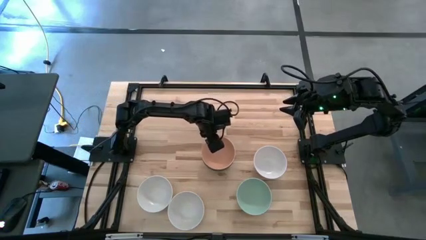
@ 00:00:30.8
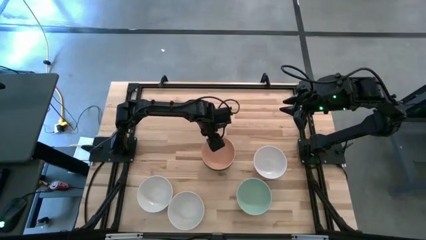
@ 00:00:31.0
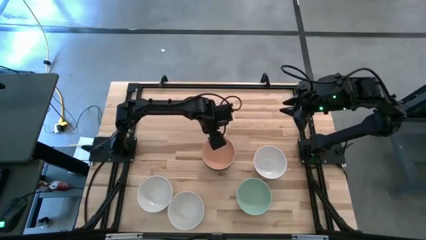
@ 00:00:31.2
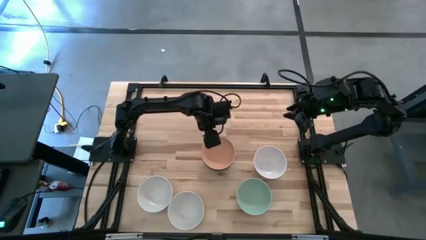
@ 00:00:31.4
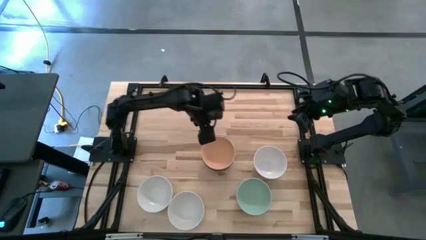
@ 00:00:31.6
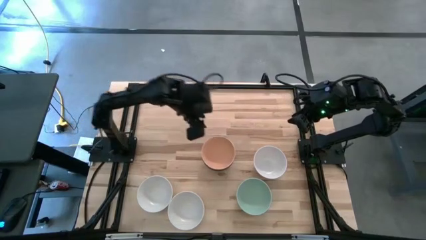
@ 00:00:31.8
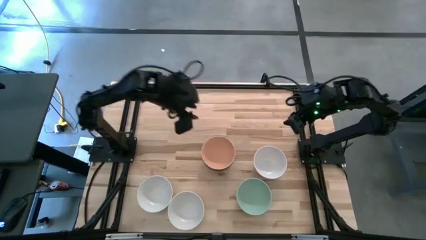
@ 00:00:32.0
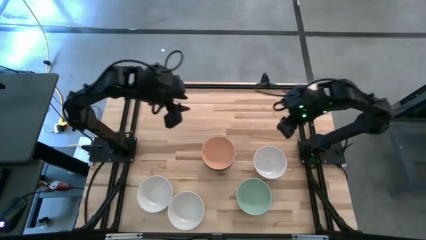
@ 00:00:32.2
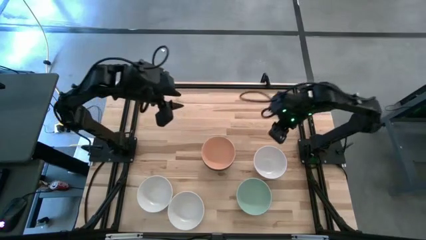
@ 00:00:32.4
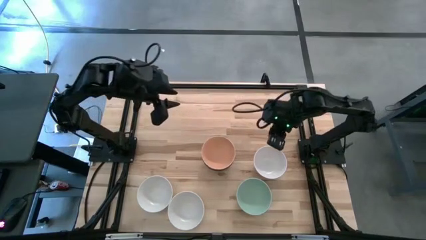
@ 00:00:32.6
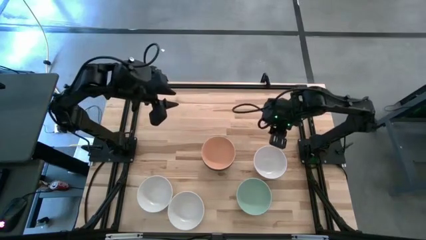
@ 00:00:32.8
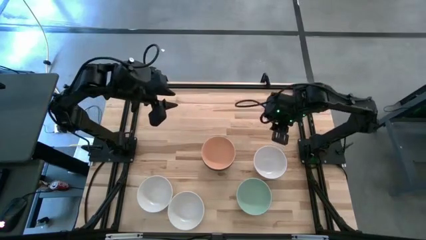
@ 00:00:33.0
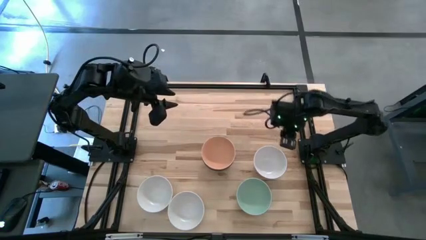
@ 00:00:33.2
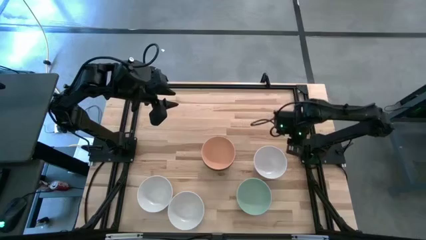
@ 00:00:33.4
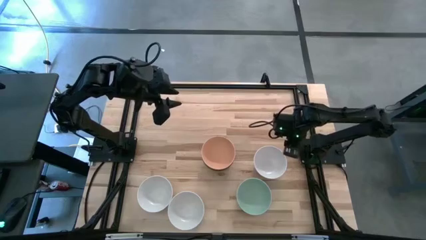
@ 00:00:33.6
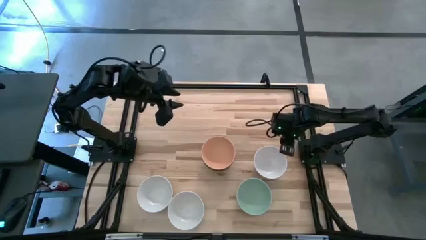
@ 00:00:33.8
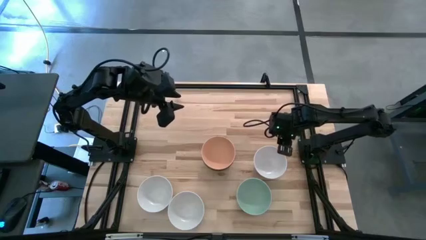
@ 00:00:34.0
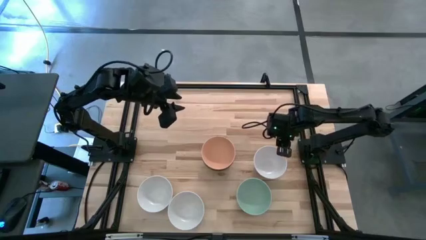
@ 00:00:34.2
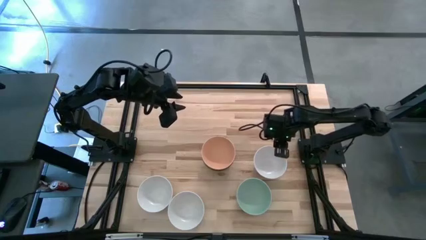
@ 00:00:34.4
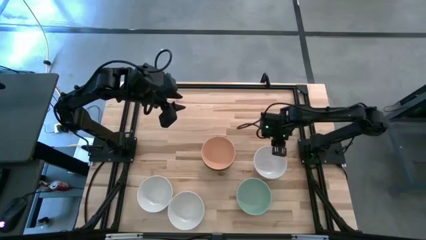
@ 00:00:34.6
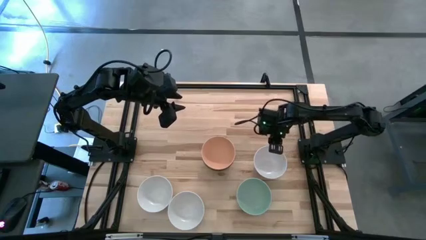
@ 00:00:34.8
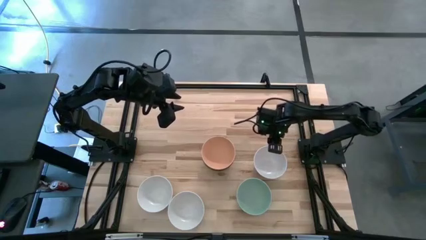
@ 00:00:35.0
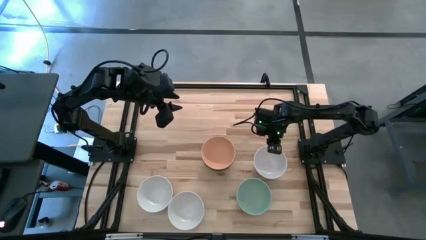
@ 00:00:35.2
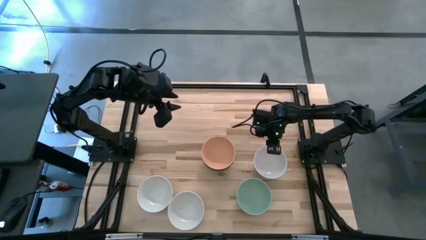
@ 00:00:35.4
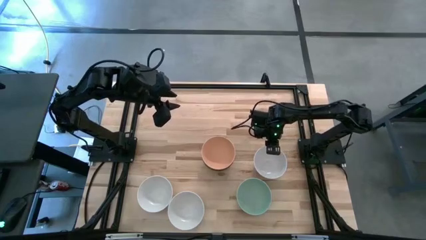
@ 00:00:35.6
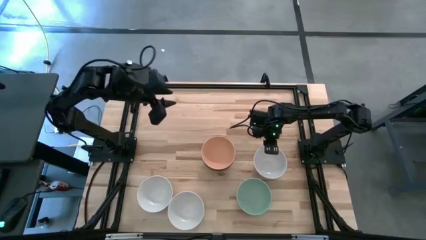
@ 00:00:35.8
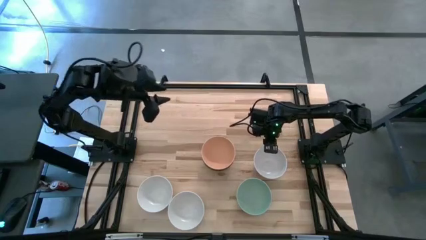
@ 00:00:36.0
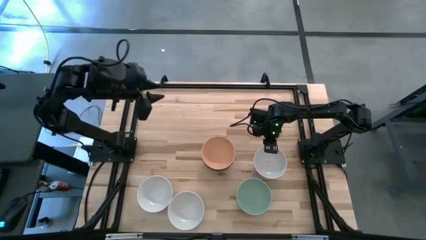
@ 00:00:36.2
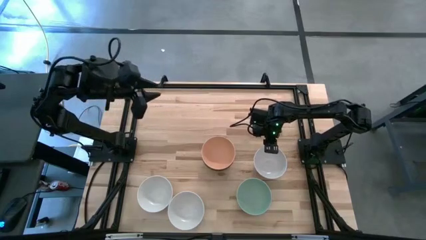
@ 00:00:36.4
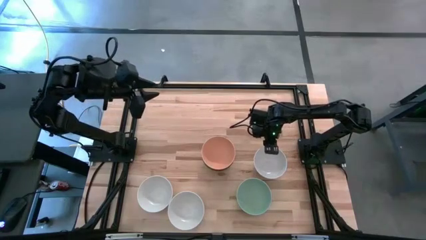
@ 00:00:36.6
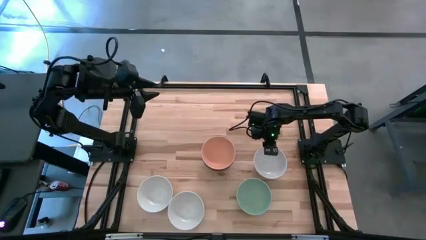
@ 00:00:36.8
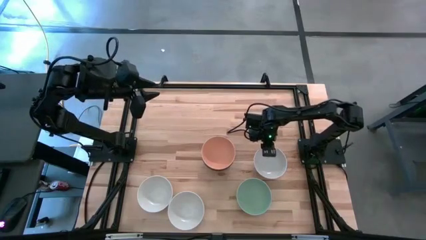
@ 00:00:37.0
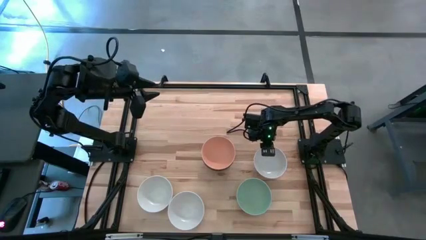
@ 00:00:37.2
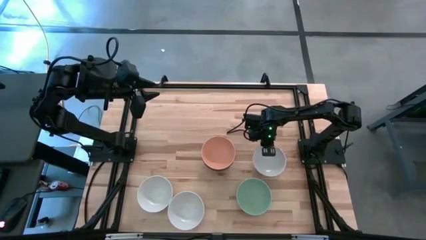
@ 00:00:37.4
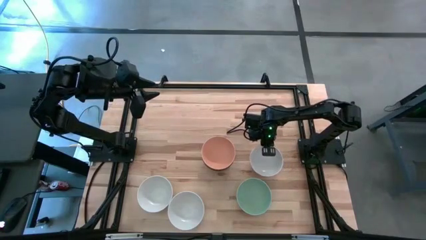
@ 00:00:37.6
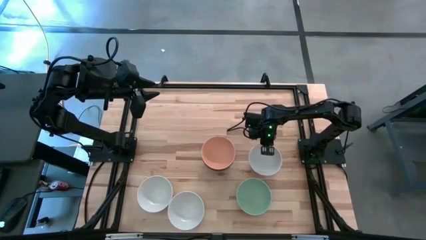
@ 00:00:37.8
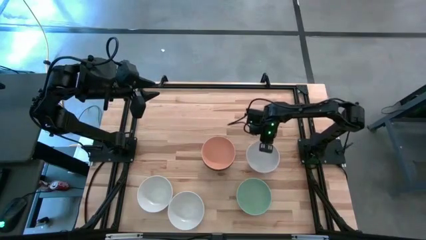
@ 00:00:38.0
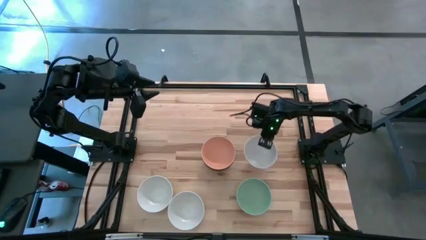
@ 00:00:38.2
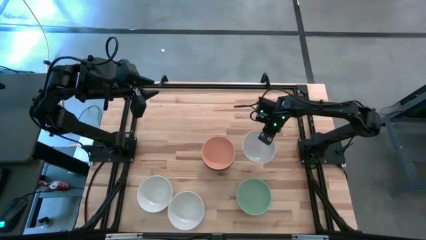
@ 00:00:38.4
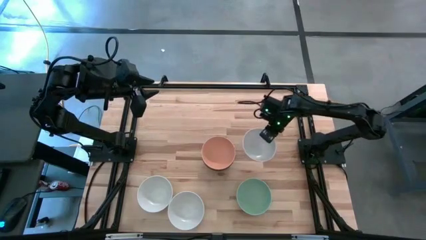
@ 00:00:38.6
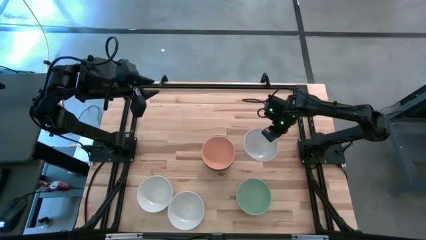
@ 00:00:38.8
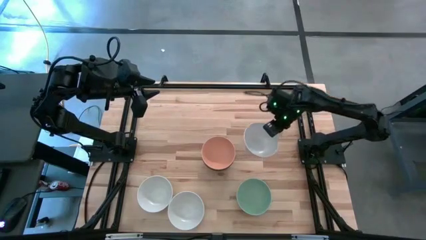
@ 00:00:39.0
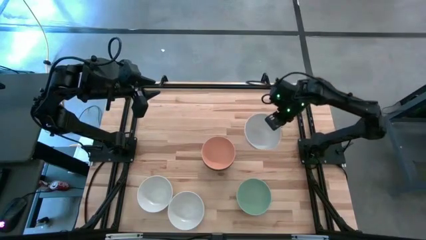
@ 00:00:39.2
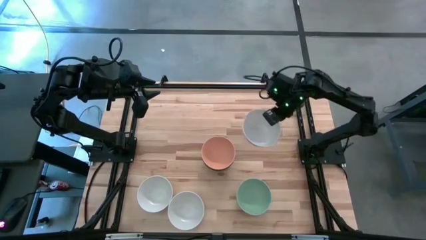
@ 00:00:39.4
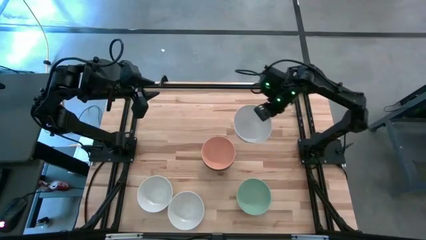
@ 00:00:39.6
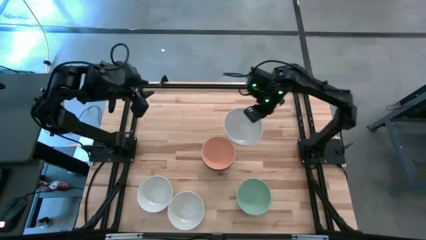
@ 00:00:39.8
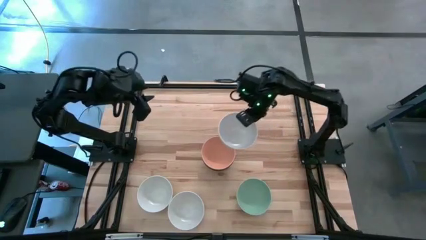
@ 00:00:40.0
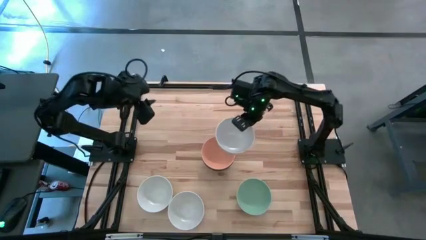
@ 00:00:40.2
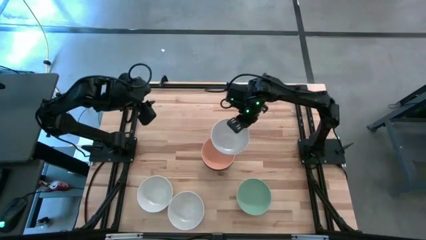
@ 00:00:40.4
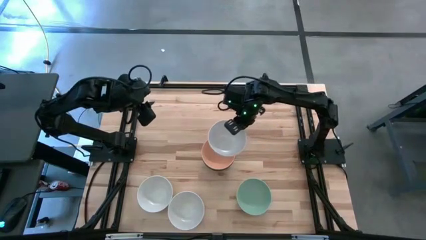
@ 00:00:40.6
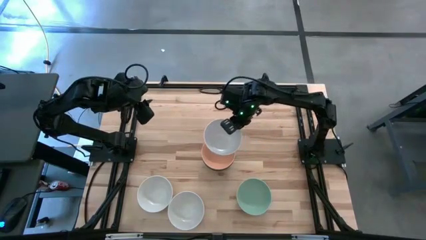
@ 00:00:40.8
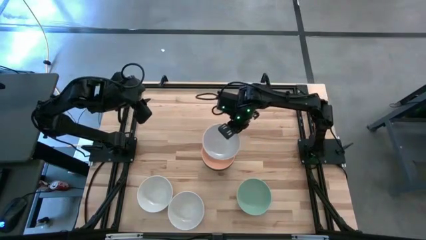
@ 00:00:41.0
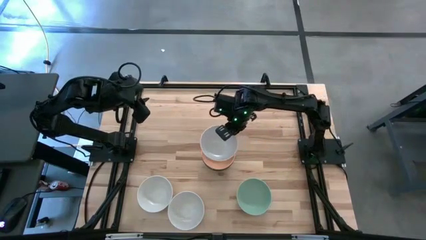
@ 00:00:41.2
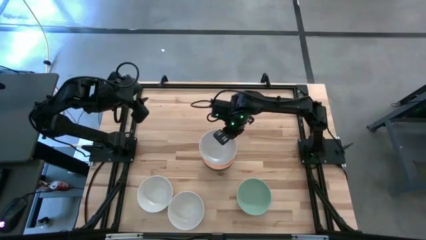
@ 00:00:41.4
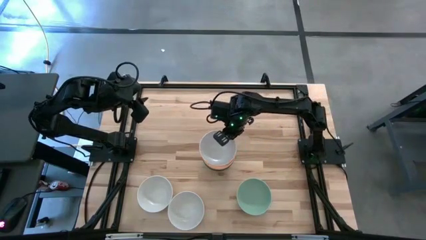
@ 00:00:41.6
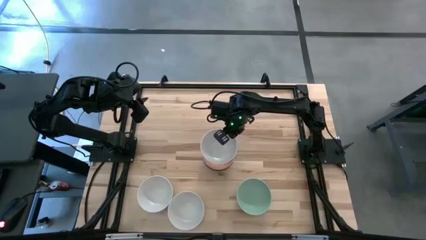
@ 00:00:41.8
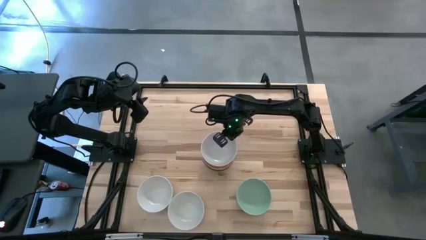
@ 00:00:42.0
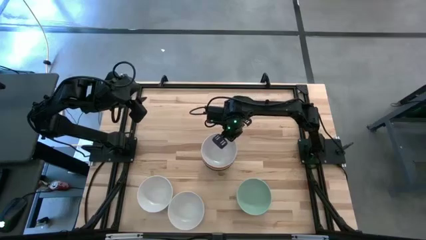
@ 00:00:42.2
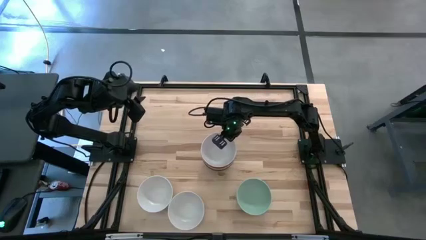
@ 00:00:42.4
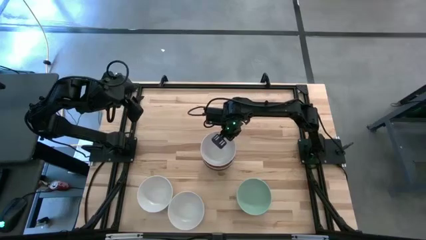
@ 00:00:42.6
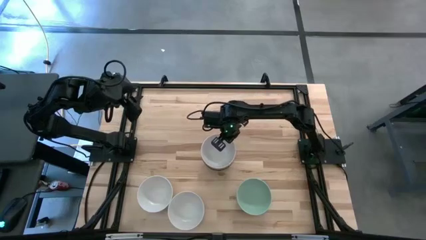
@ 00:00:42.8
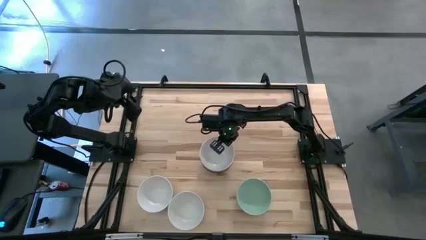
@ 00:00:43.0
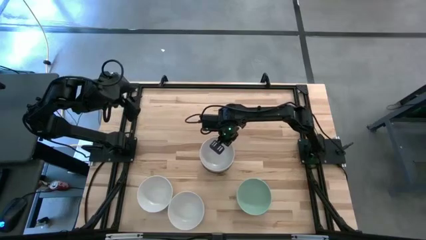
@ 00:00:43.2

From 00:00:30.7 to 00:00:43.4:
Task: Nest bowls inside each other
Stack the top white bowl on the orange bowl
